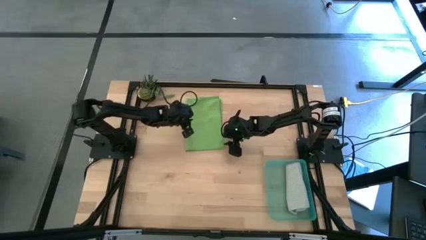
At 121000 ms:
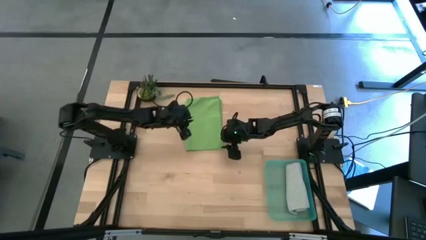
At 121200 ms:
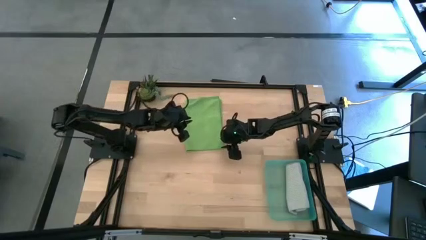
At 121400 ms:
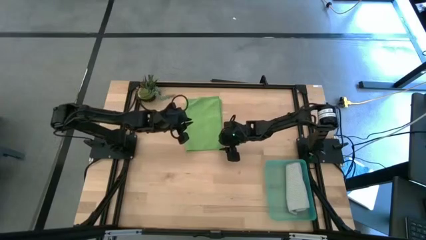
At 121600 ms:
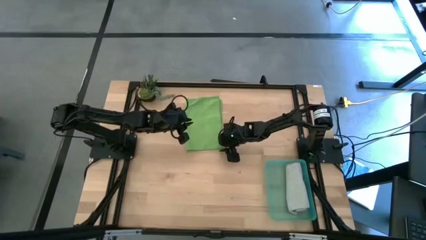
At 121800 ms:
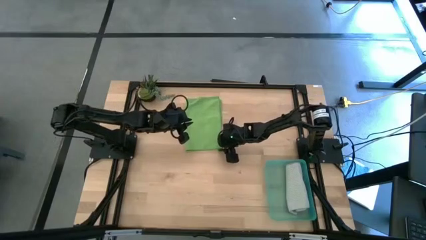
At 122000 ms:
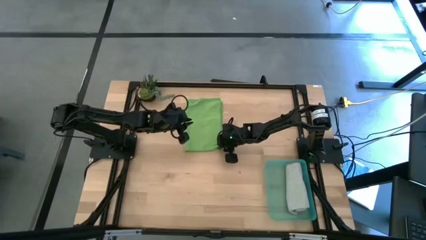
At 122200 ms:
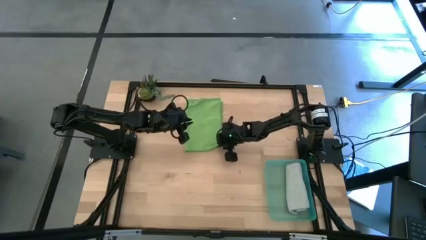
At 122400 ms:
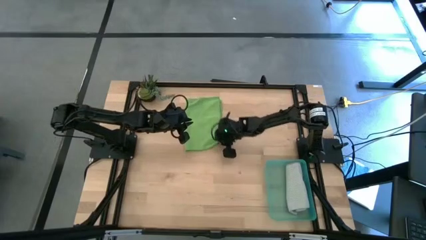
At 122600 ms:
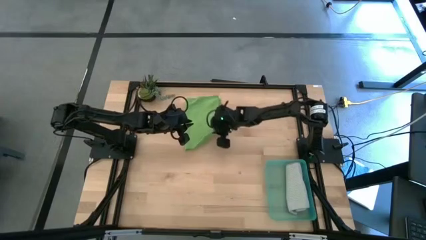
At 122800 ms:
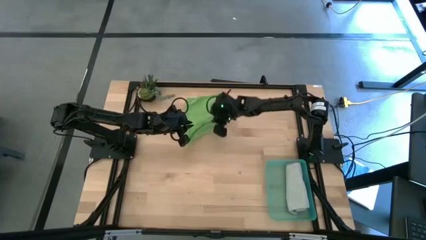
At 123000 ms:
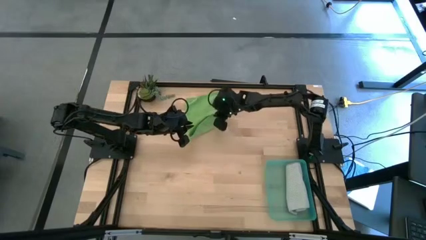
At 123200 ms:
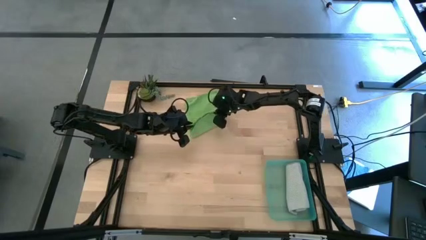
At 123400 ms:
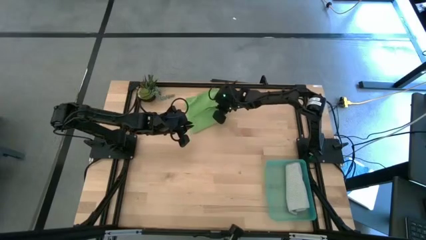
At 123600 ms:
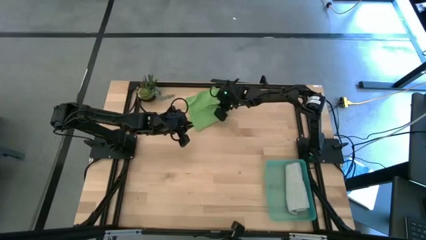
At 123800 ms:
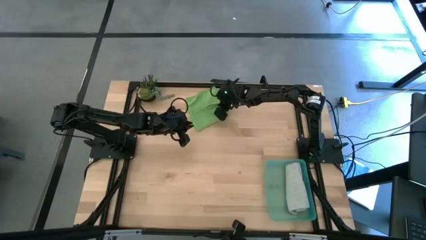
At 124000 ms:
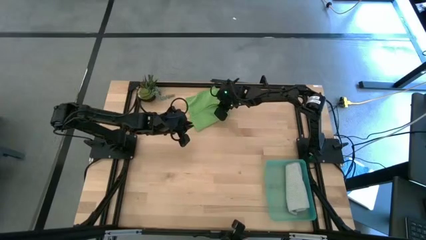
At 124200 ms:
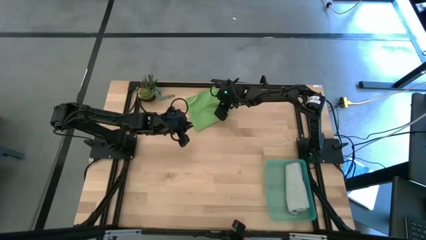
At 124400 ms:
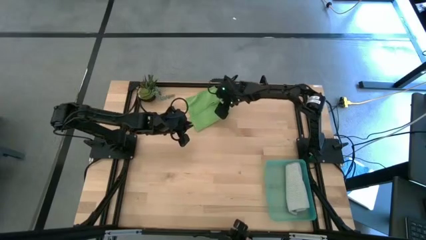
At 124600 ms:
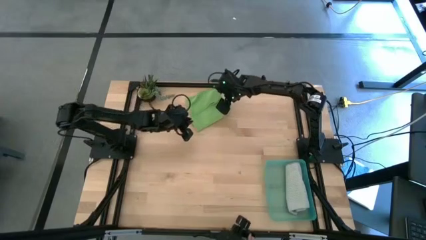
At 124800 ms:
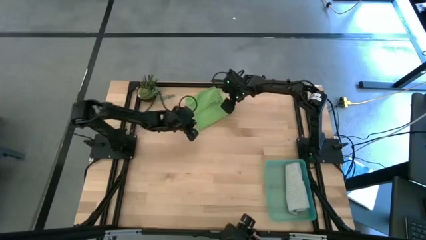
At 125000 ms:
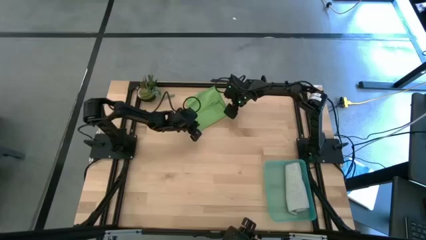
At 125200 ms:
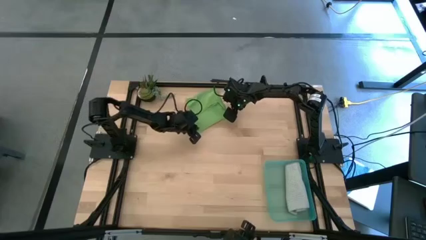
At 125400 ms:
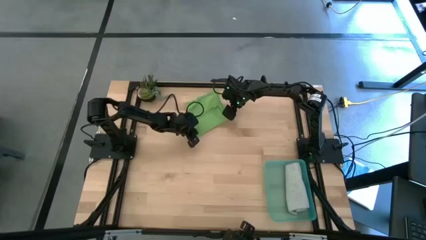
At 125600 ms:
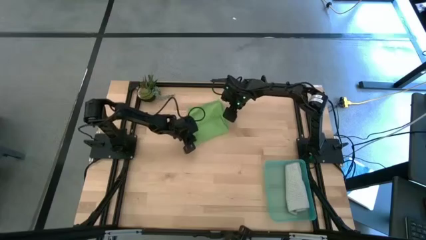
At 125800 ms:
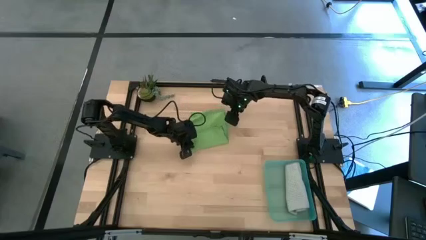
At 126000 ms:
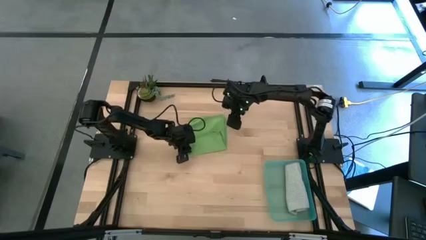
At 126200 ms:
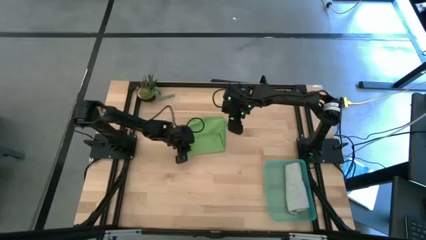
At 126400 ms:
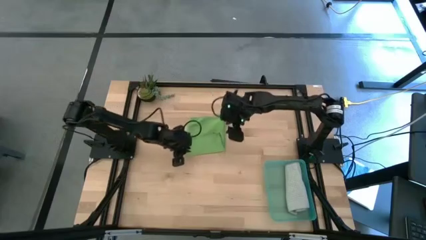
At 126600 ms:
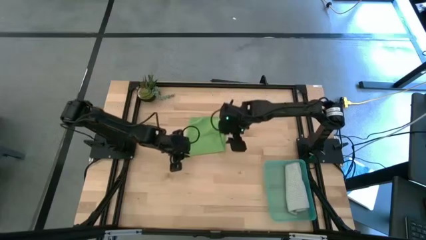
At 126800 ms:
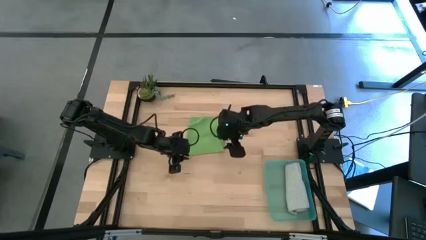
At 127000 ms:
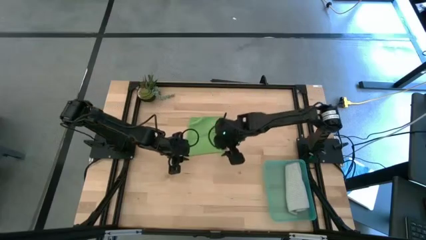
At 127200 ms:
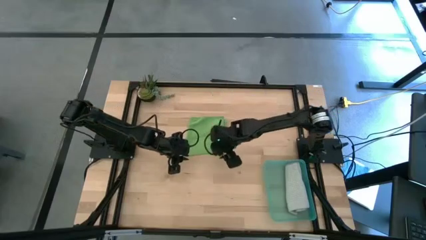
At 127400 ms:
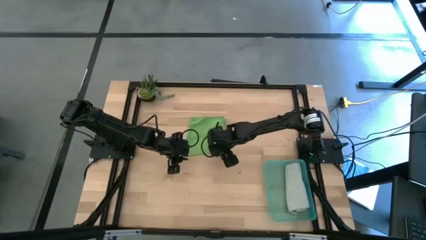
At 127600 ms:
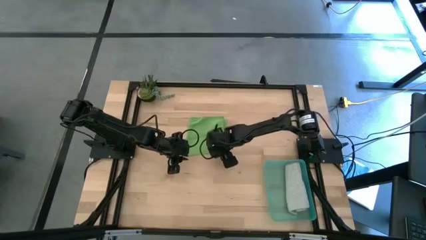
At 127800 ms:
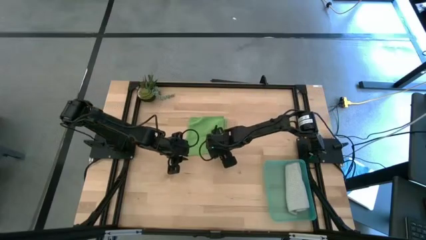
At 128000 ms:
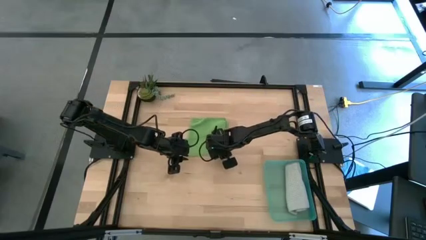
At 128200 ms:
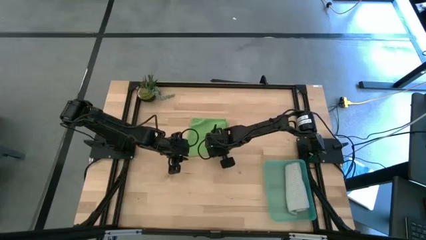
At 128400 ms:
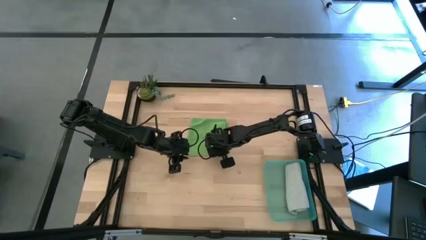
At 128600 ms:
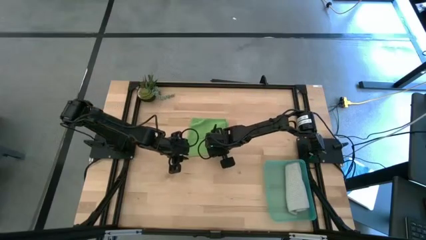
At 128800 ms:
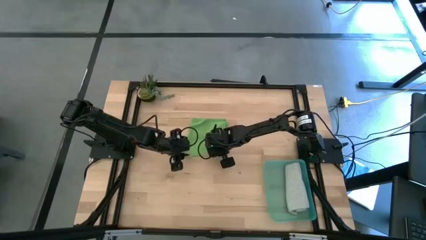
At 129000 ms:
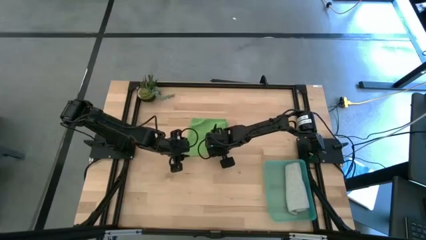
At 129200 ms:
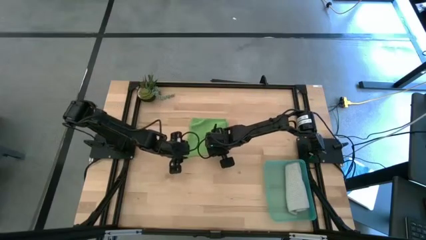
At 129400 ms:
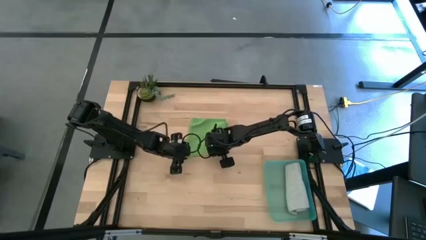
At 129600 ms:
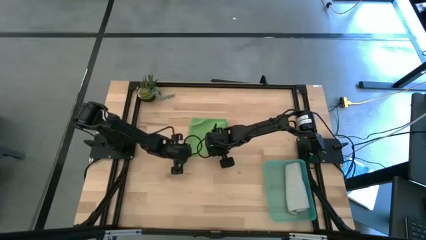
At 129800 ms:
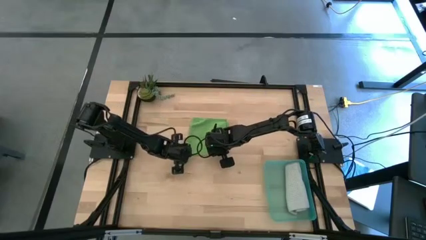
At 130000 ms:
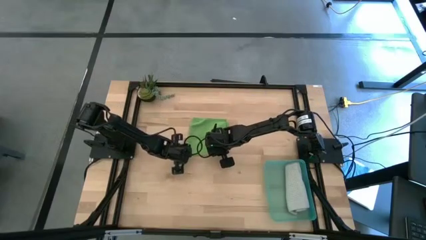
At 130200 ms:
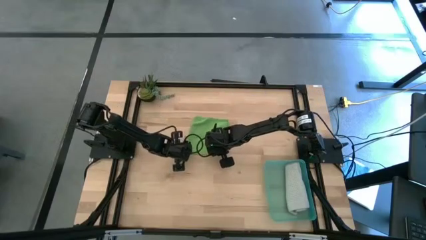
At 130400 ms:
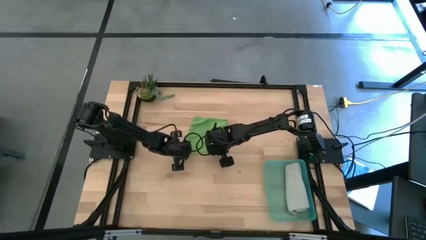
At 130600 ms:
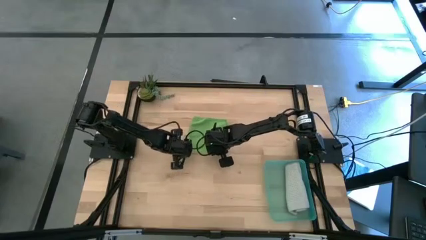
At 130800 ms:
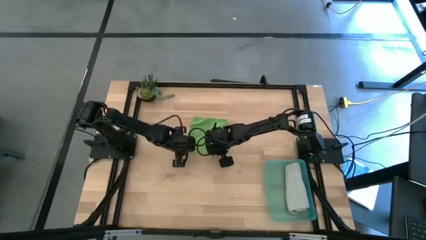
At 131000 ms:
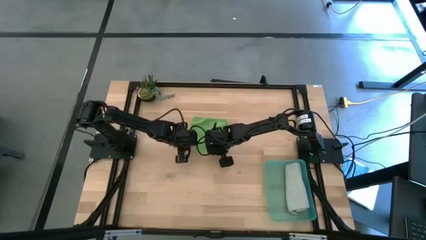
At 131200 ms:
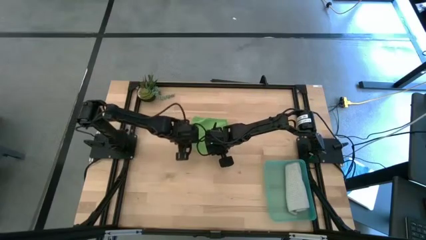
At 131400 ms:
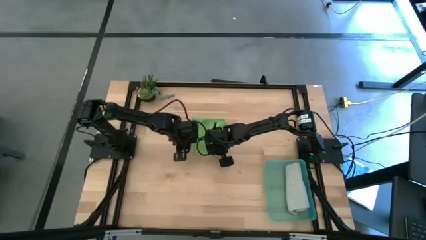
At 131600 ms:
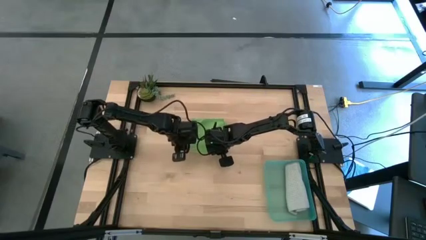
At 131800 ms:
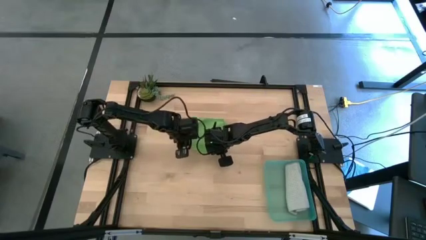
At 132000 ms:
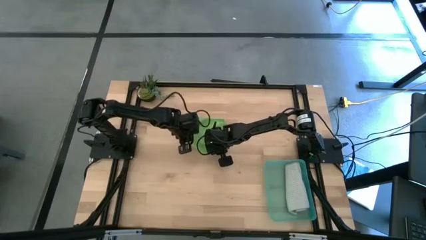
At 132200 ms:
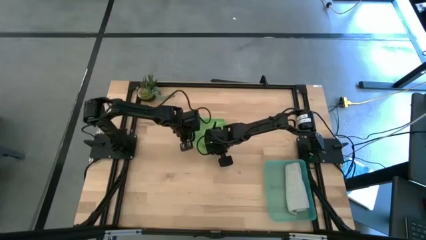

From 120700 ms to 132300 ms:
Task: Roll microfiber towels into tight, uniform cylinder then place into a basket
Roll the green microfiber towel

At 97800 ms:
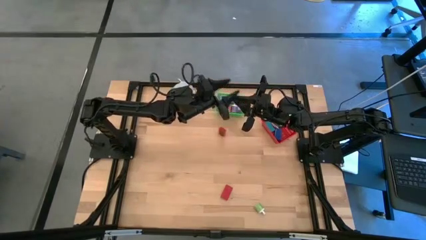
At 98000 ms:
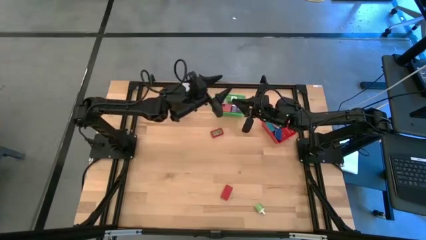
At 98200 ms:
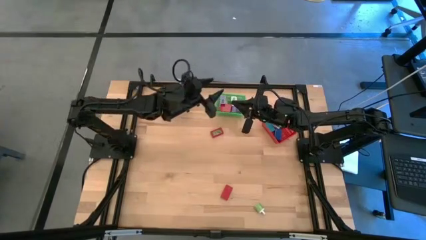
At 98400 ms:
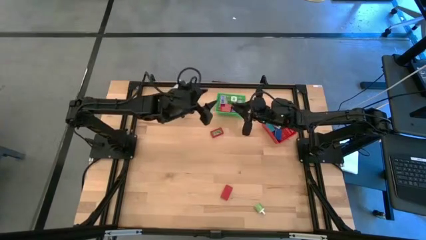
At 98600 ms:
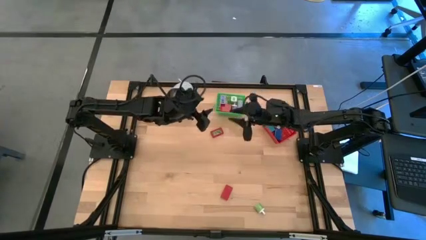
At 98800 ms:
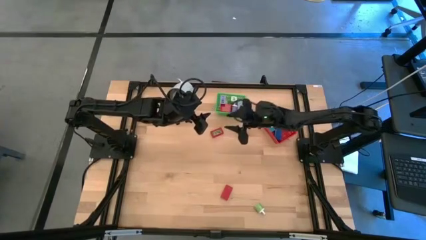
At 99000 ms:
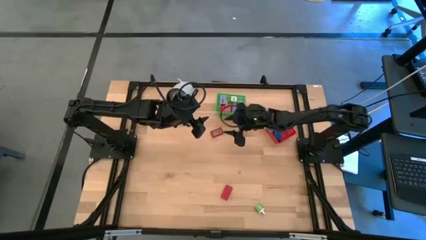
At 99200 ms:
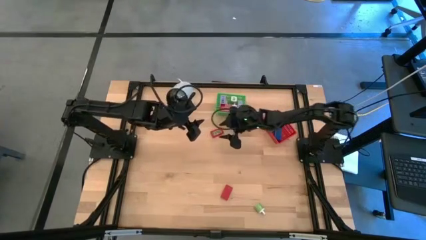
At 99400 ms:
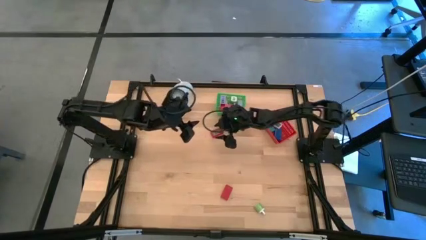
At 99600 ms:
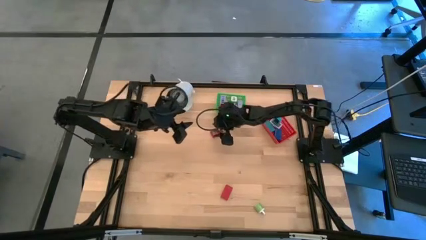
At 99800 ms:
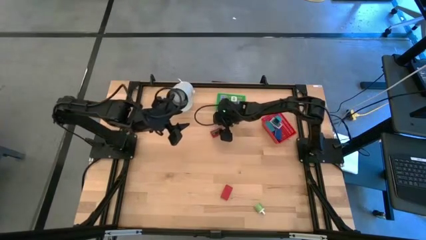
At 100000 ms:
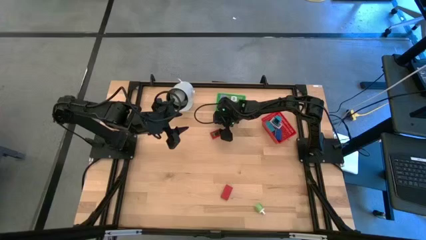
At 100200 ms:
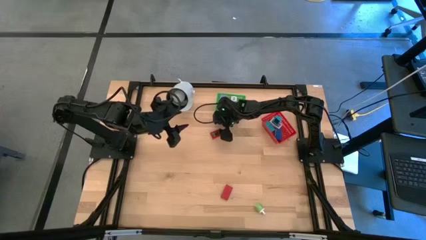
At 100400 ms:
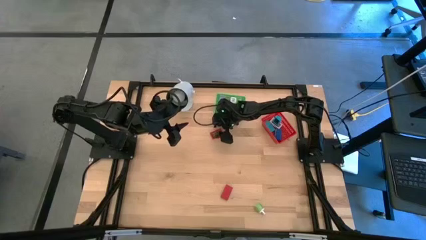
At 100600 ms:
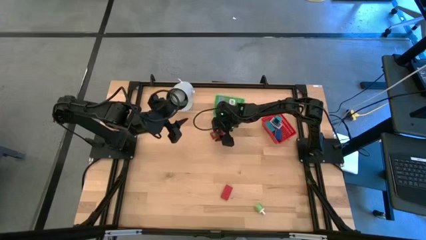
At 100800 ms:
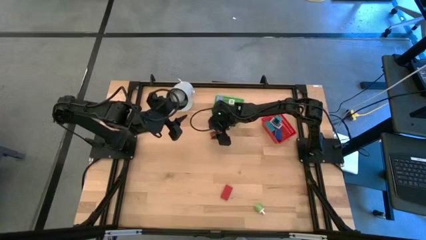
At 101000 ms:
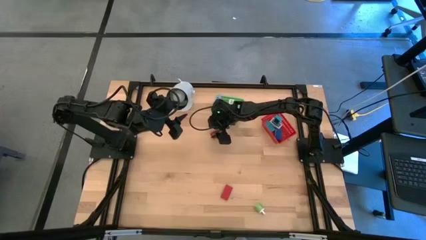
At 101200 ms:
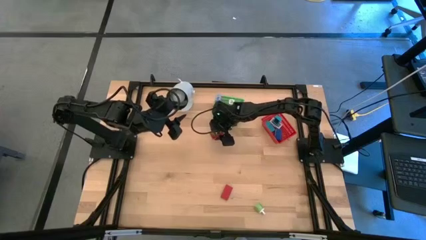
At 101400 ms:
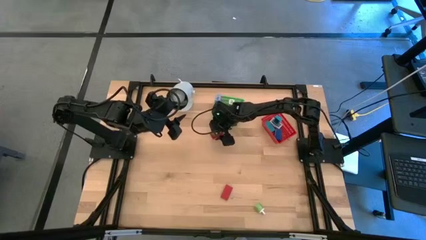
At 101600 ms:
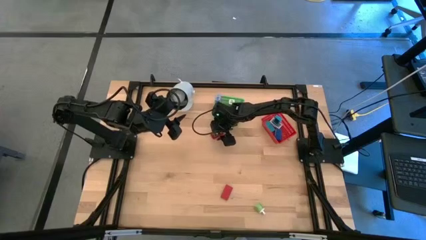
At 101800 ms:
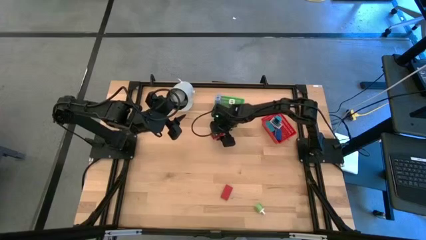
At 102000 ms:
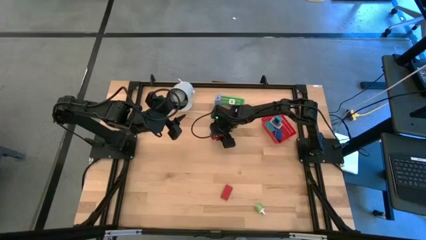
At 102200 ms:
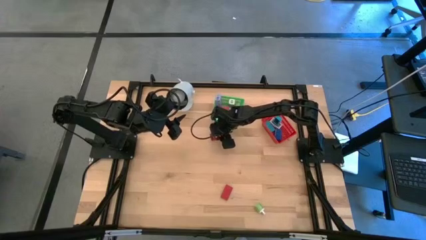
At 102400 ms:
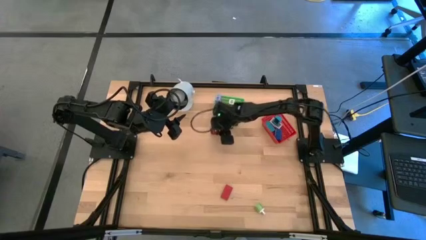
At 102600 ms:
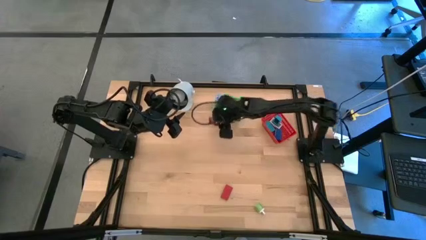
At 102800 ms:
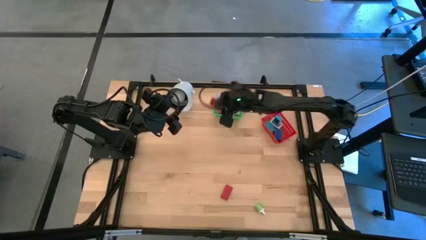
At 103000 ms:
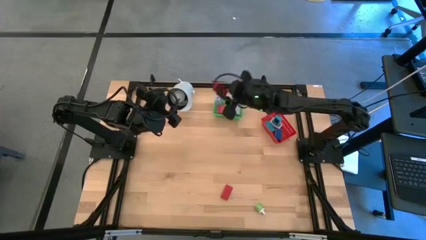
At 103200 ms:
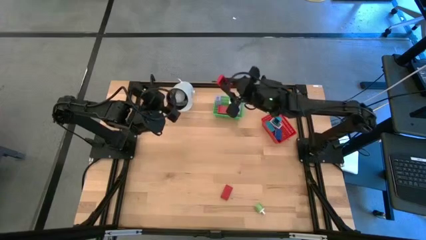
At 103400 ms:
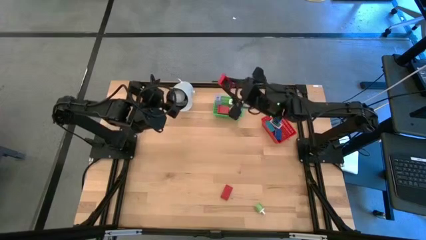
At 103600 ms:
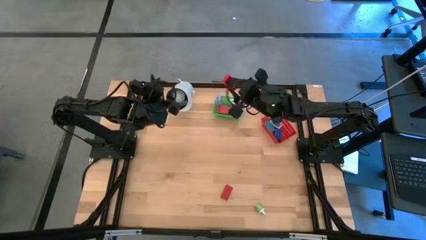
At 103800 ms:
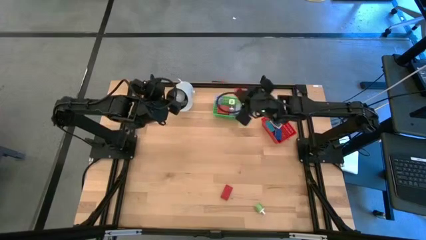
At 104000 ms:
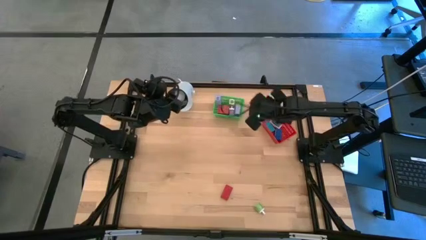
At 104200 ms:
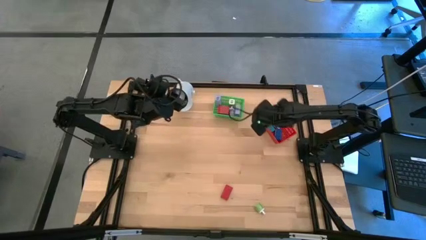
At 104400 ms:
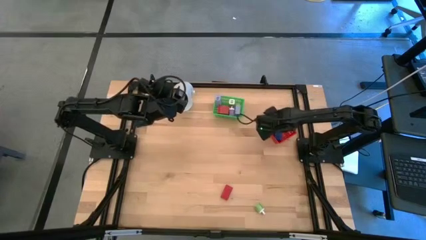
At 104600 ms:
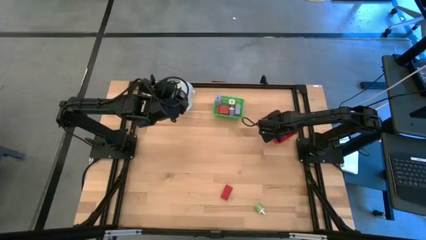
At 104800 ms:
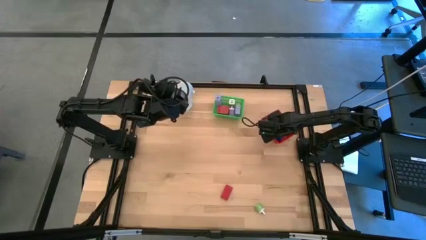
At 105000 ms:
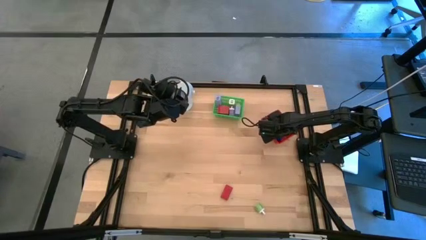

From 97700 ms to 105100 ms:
Task: Pick & Place Office items
Put the bottom red digital timer into the red bin
